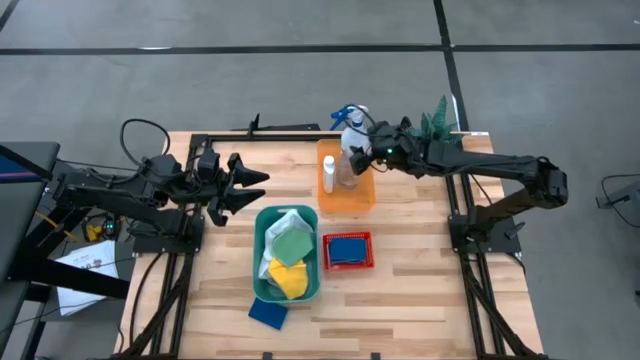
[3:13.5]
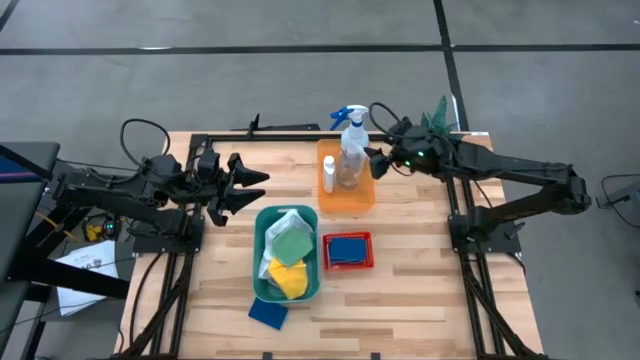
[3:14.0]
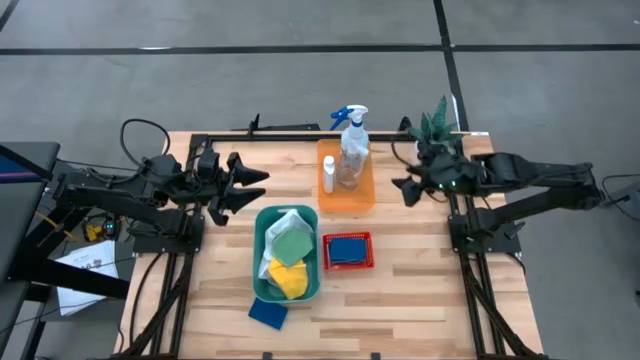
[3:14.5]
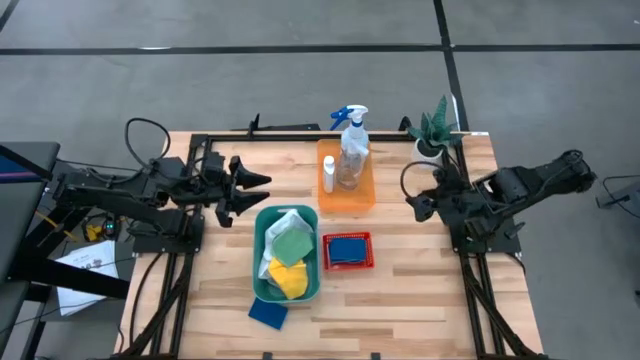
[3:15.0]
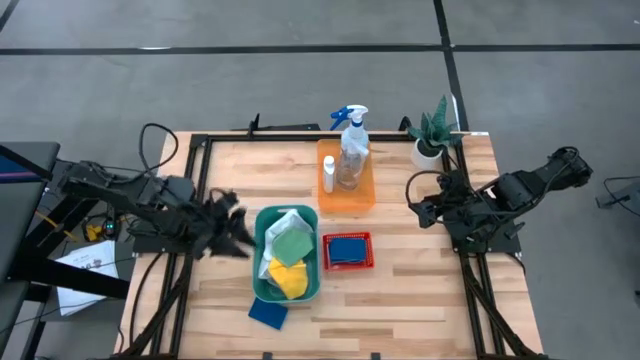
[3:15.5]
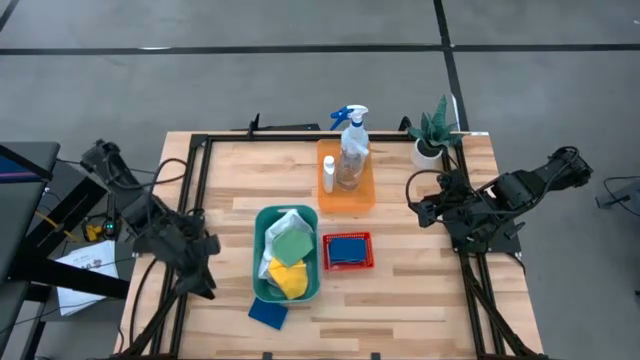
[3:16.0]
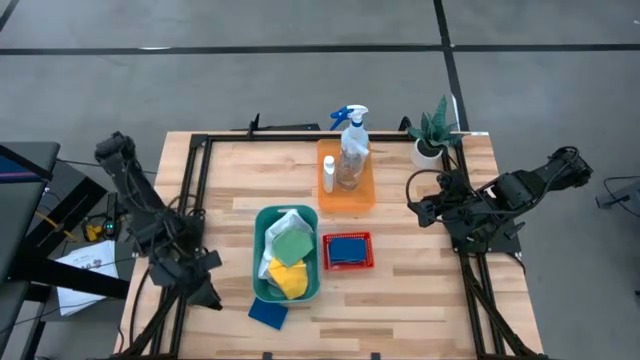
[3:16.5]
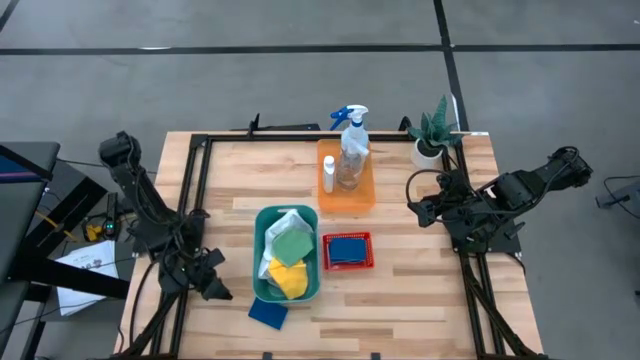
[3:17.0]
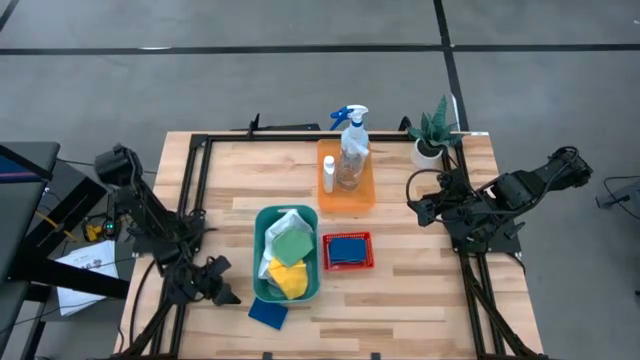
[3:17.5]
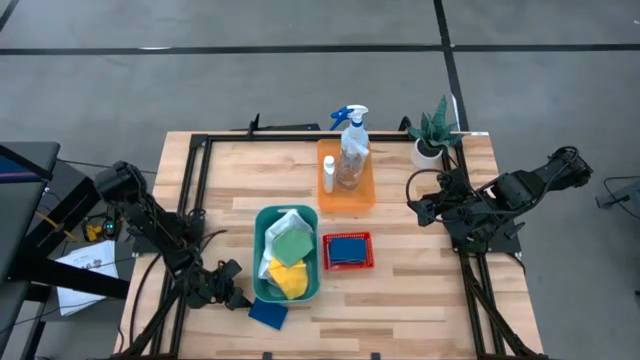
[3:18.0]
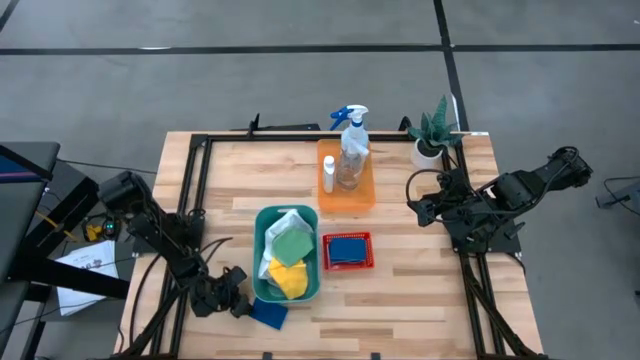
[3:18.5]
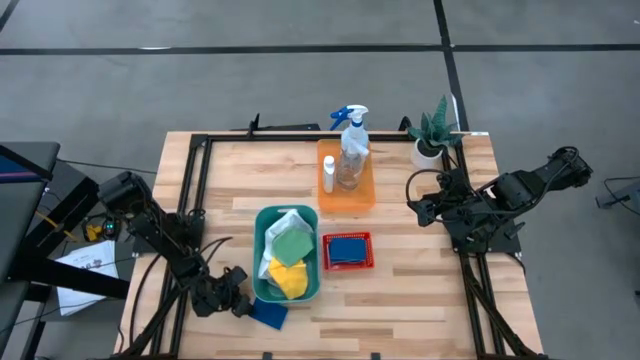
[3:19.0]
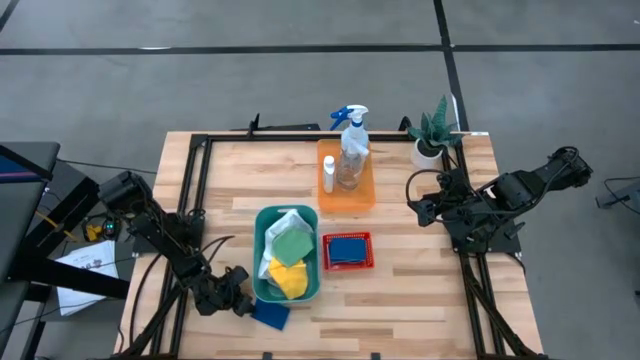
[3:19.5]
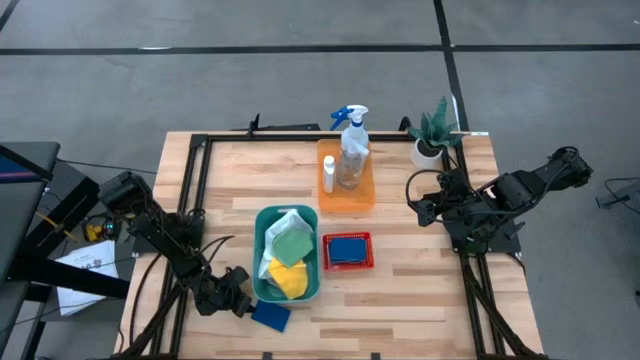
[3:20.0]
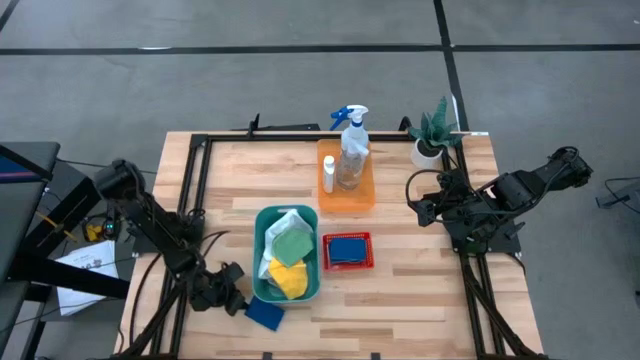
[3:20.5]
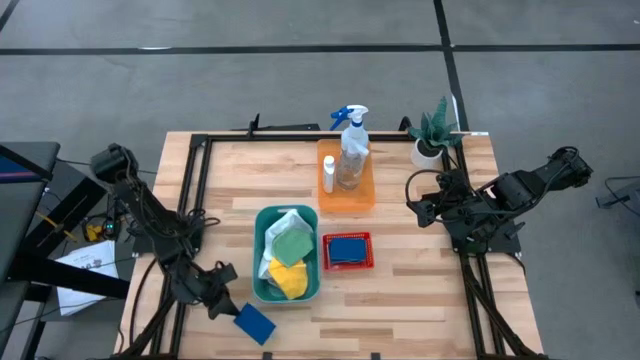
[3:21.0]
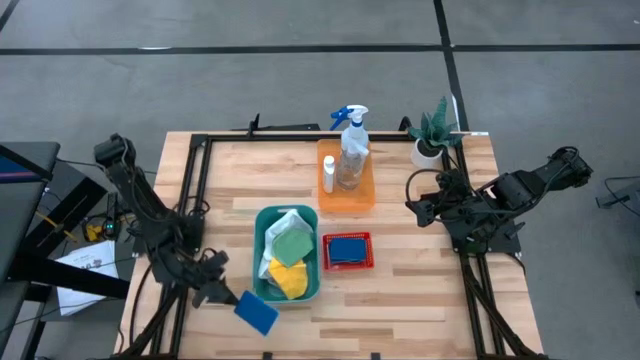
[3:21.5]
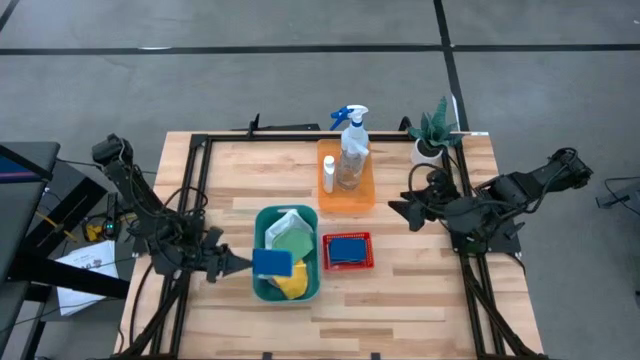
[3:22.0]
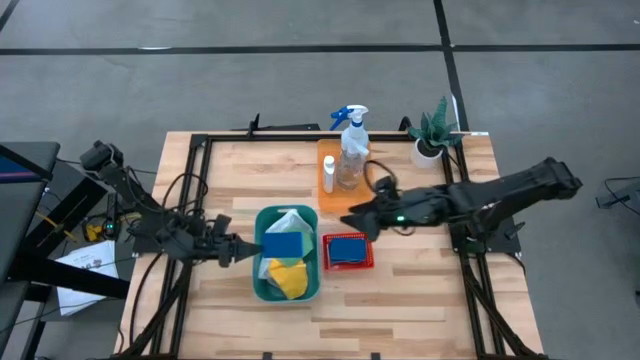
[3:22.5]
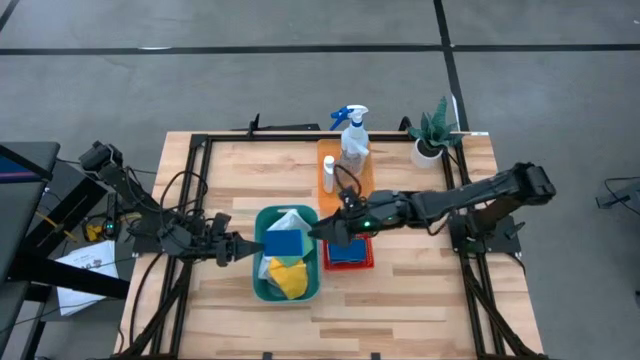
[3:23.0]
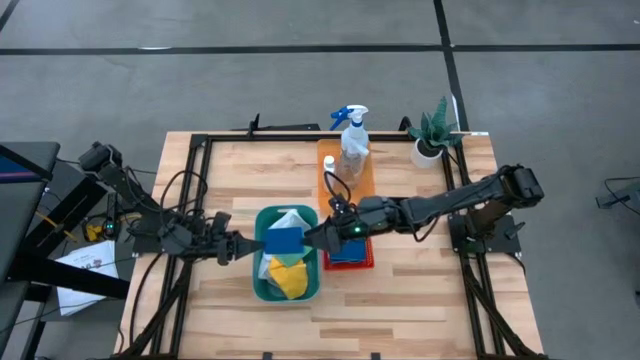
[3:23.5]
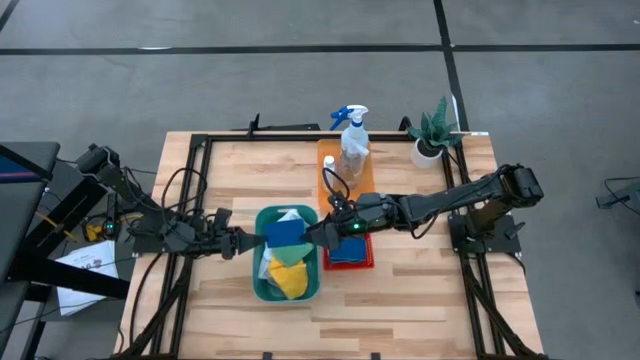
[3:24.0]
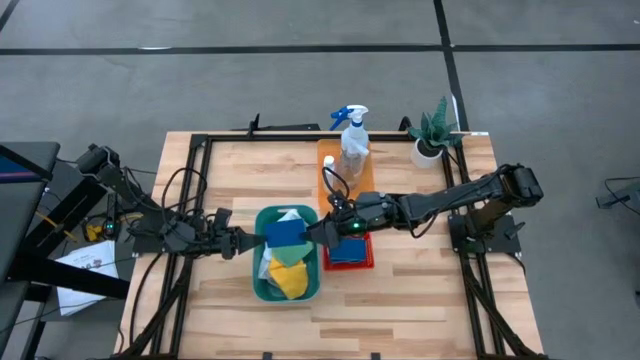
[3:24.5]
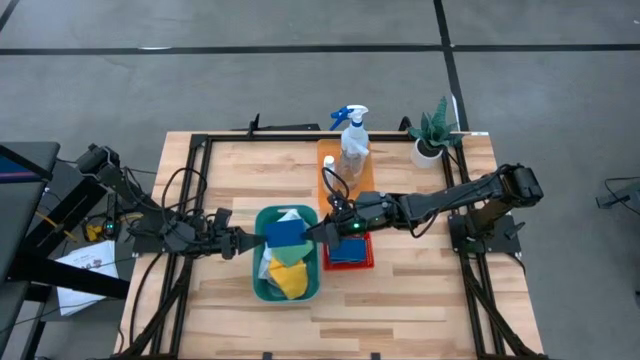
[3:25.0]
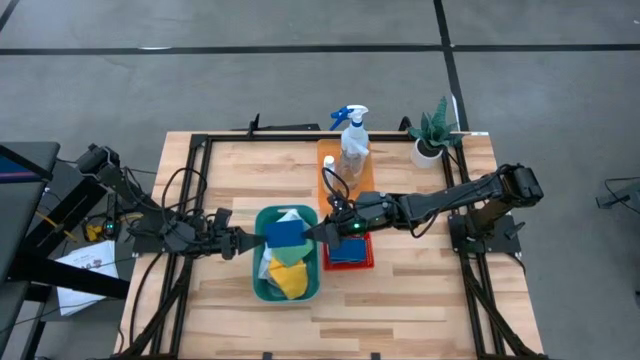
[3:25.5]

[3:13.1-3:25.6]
Task: Pick & Place Kitchen Items
Put the blue sponge into the red bin

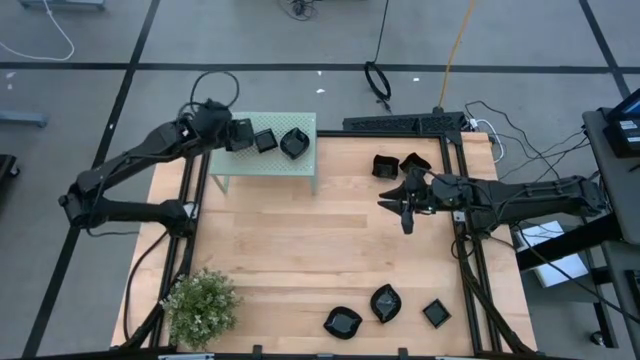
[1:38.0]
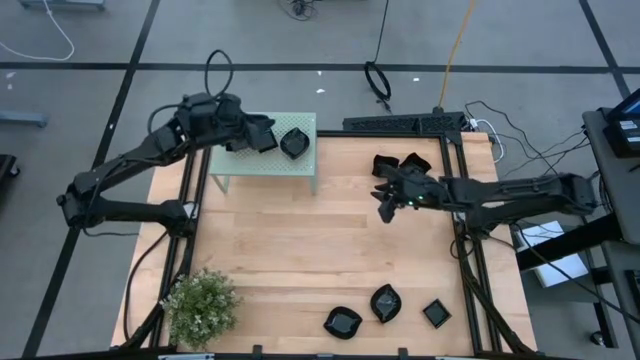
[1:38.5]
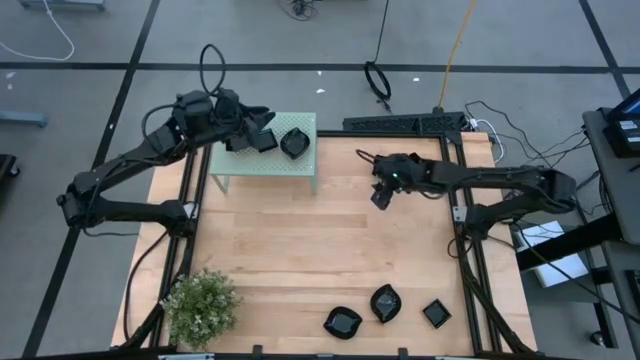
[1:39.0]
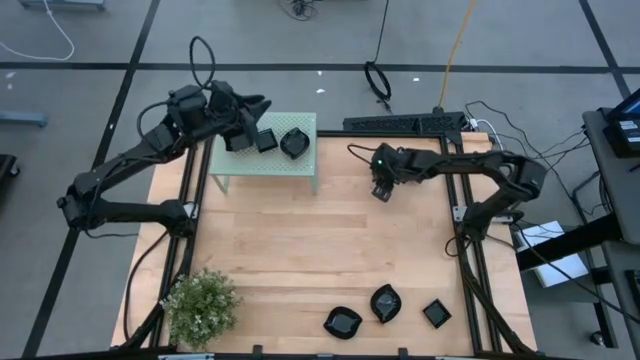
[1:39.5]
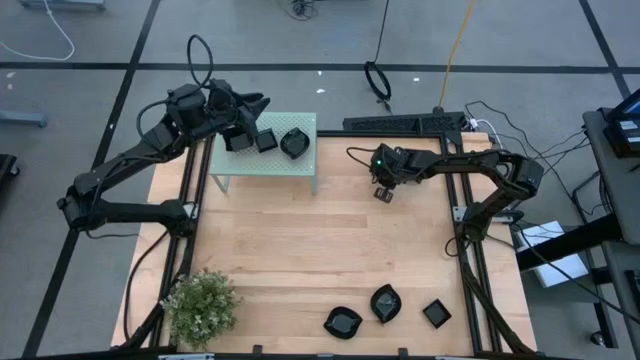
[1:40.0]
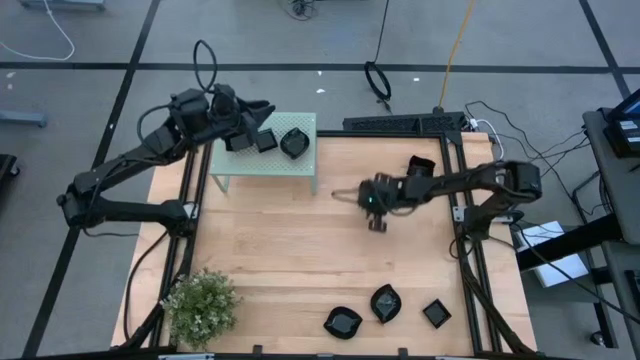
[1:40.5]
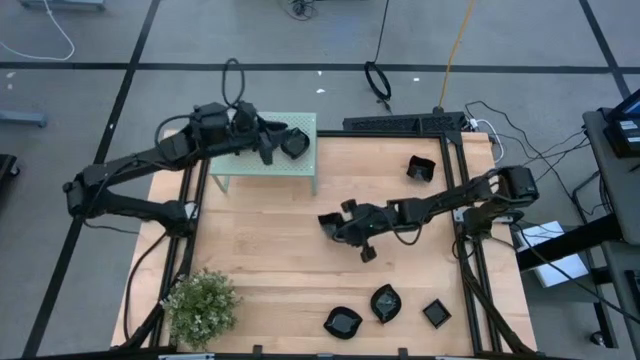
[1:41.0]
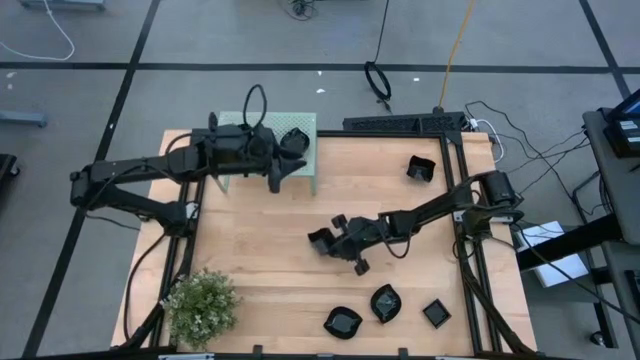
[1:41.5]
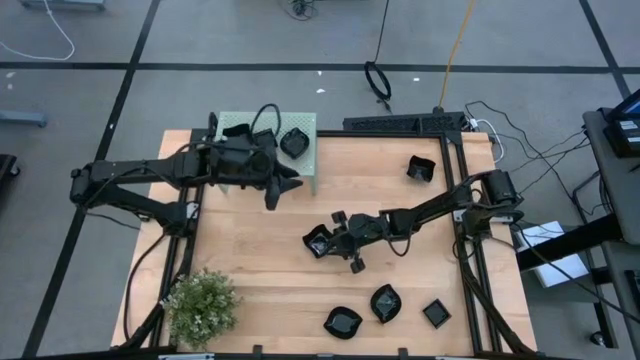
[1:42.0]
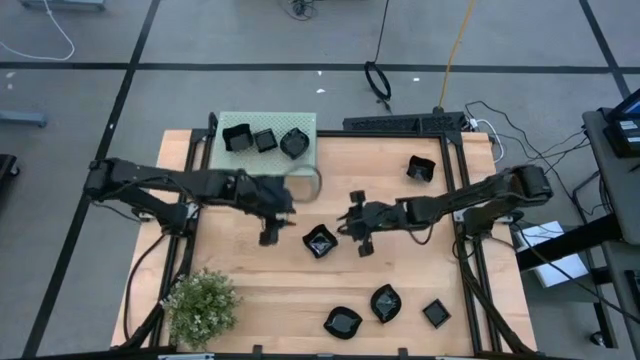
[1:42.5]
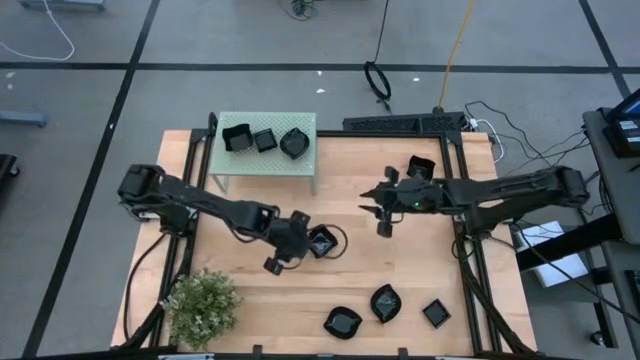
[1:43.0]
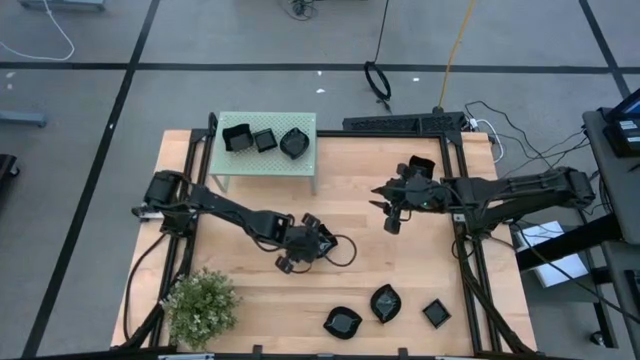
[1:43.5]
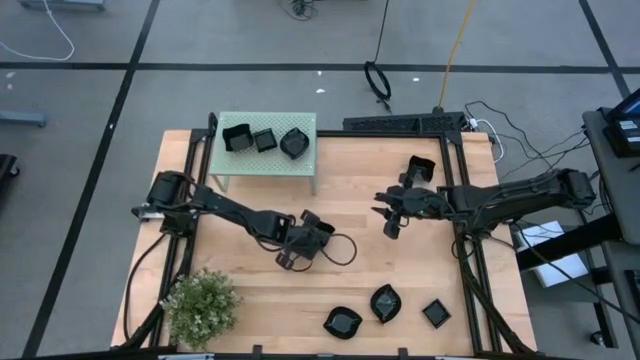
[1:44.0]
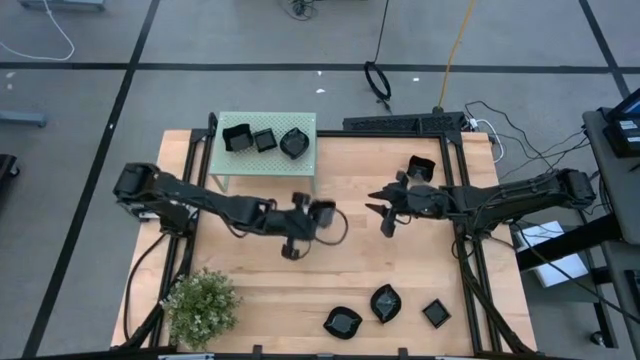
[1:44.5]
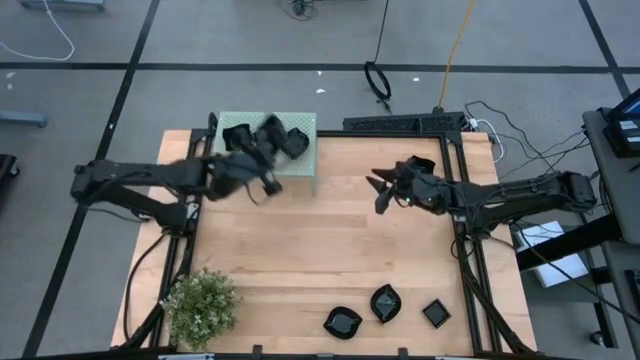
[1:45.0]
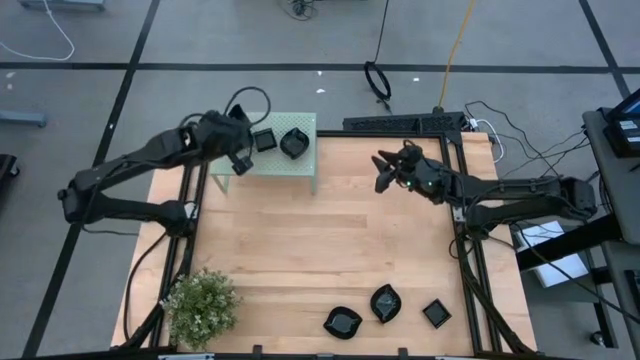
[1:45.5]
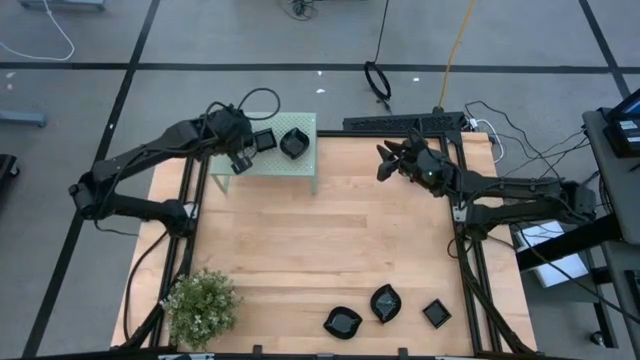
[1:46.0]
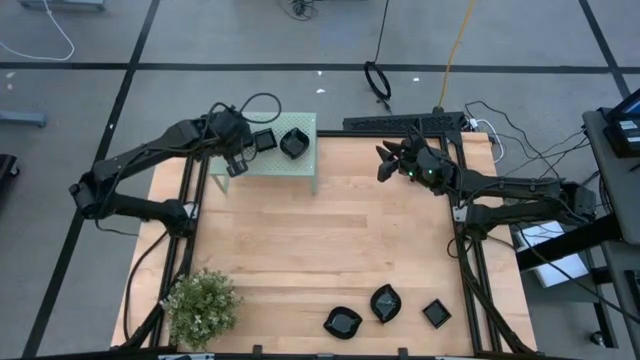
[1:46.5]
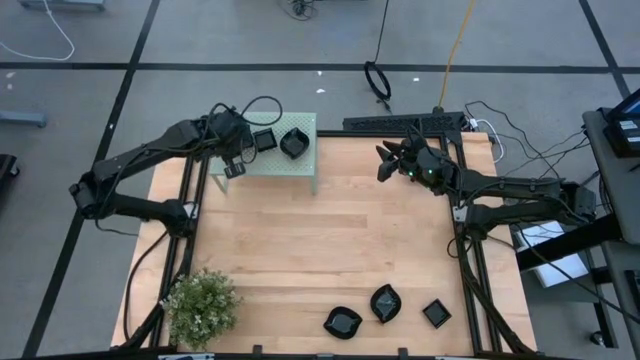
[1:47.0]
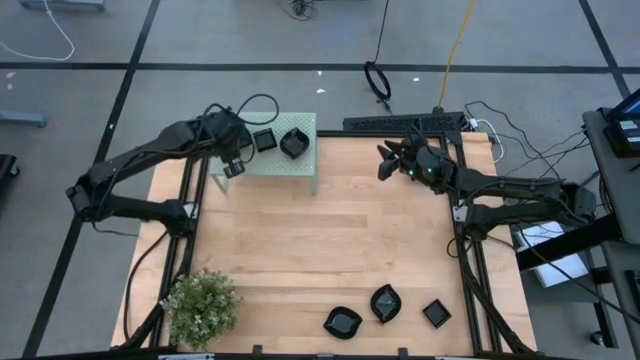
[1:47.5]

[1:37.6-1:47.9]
Task: Pick & Place Mini shaped plates
Stack the left distorted square plate on top of the distorted square plate on the shelf
